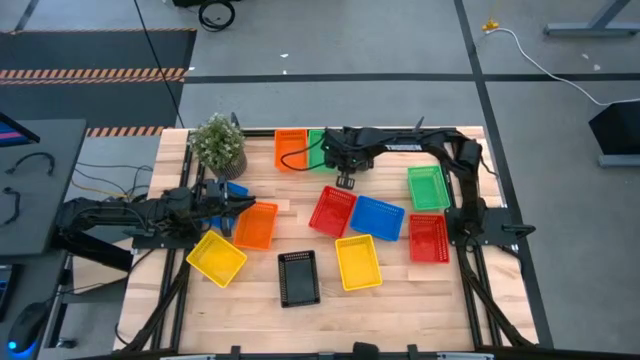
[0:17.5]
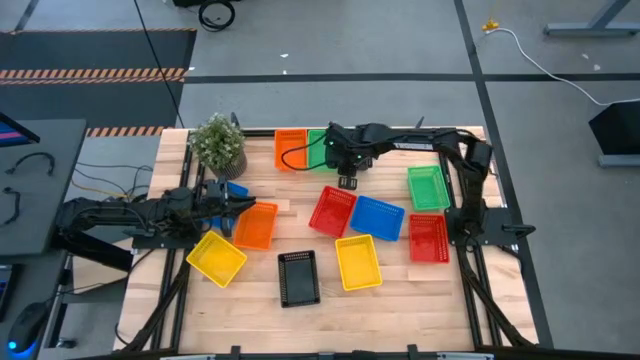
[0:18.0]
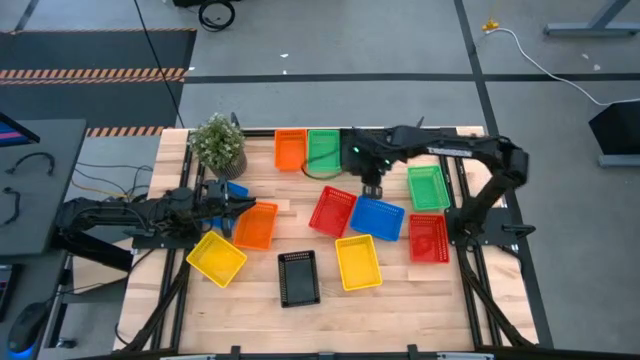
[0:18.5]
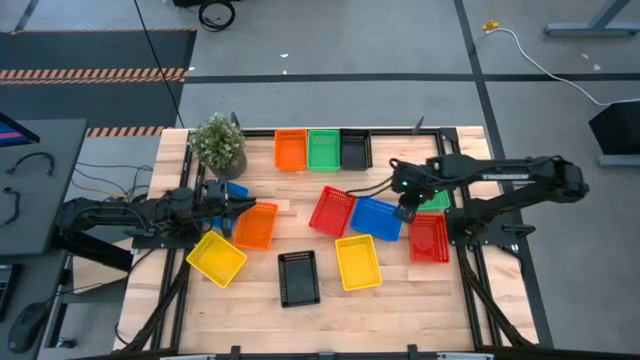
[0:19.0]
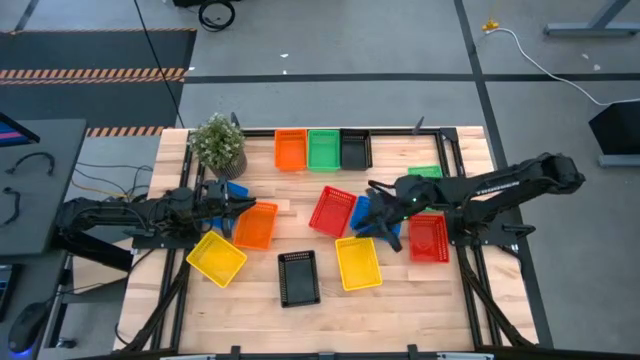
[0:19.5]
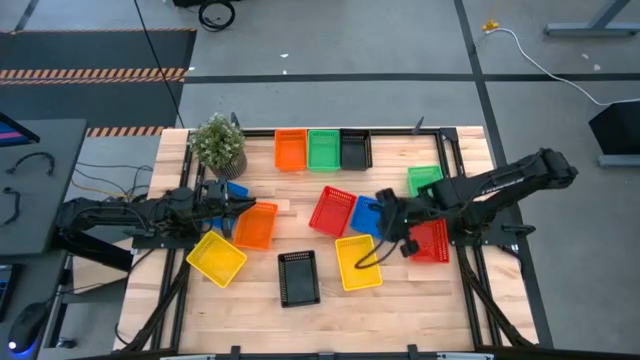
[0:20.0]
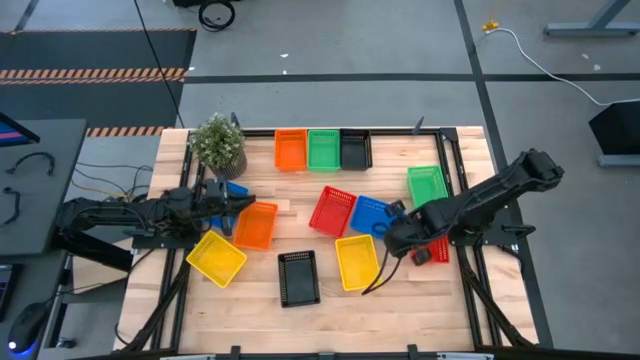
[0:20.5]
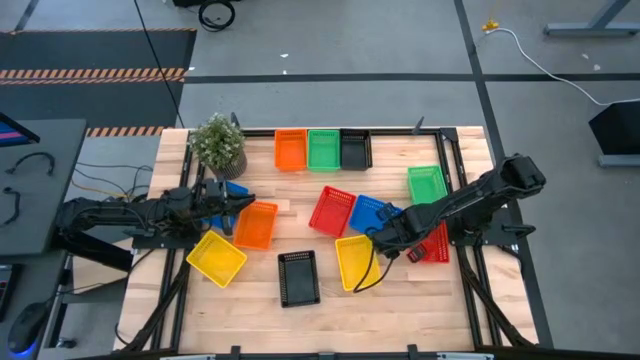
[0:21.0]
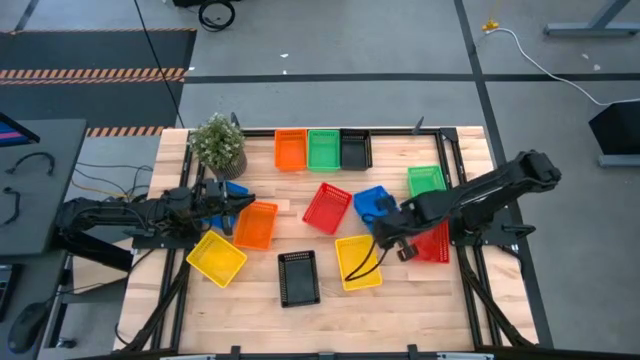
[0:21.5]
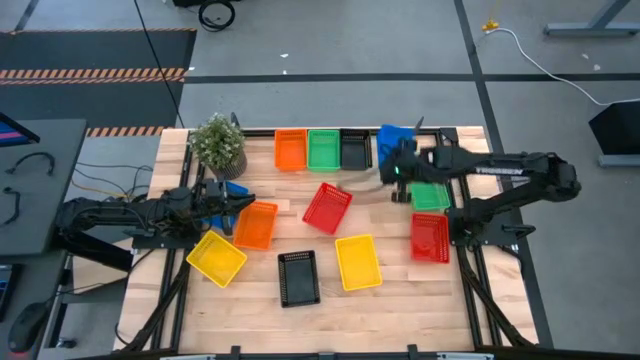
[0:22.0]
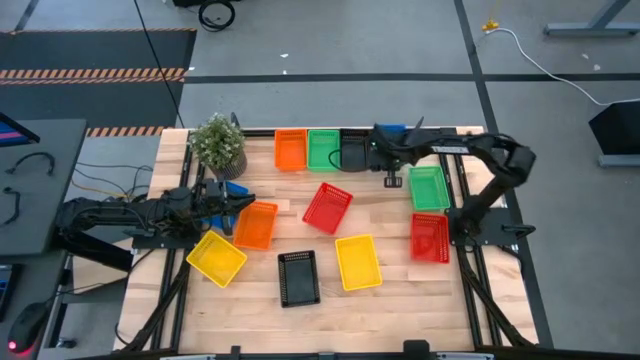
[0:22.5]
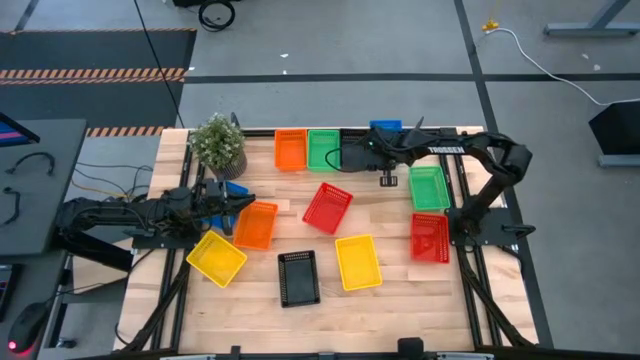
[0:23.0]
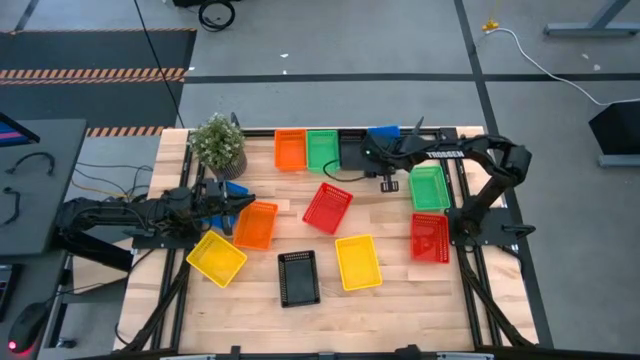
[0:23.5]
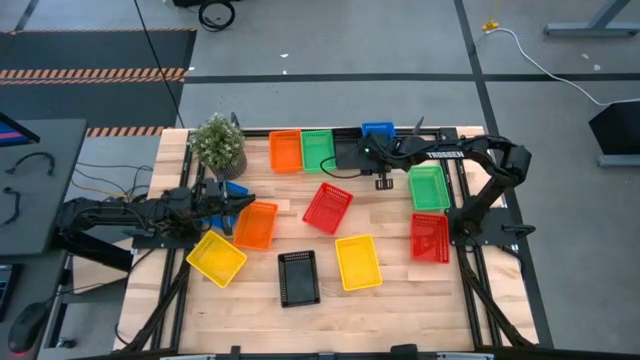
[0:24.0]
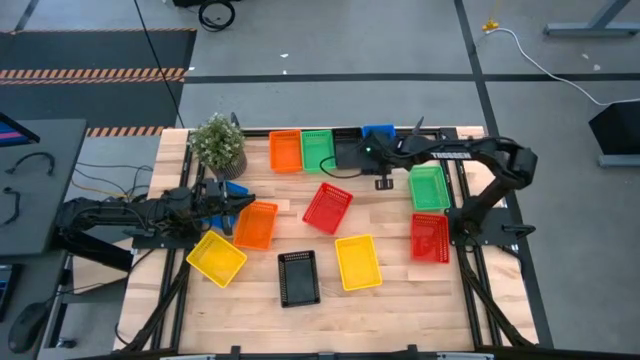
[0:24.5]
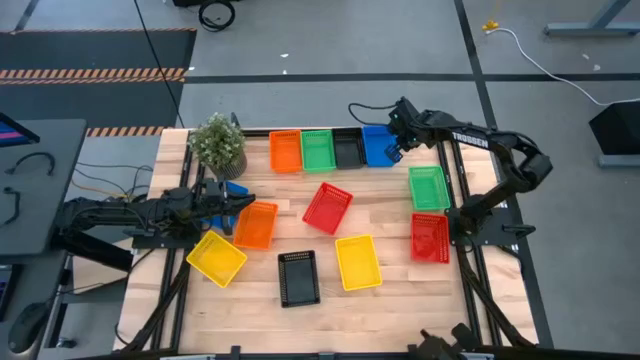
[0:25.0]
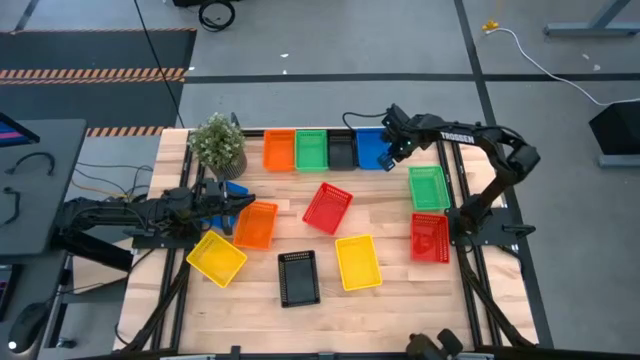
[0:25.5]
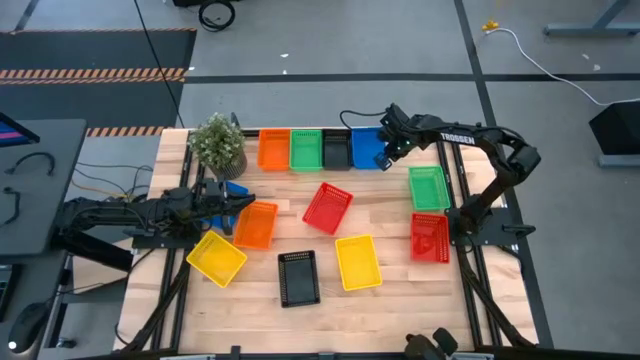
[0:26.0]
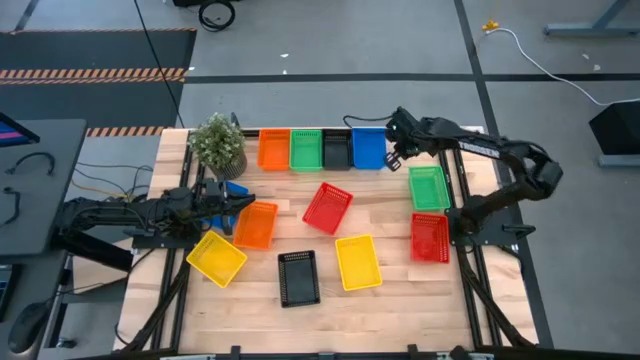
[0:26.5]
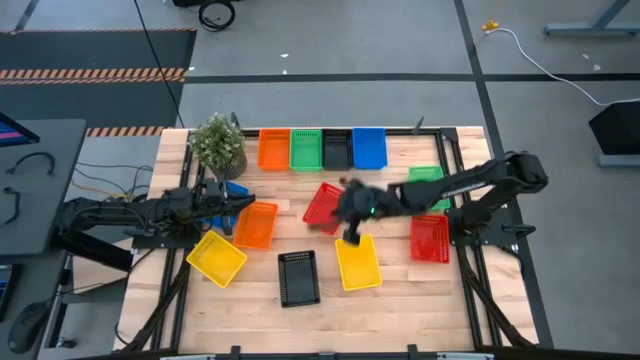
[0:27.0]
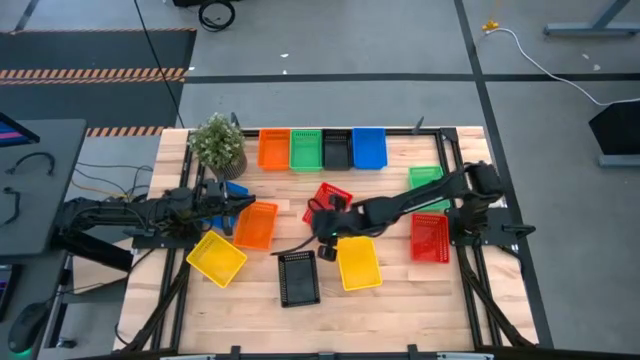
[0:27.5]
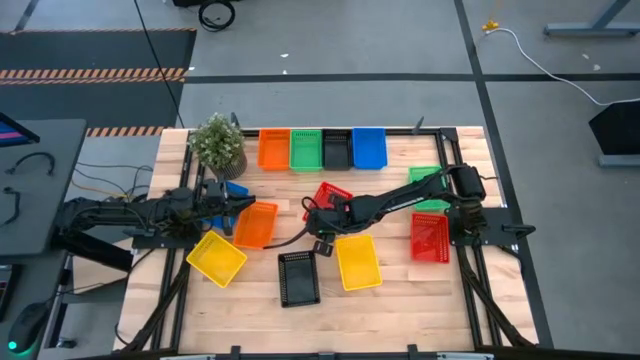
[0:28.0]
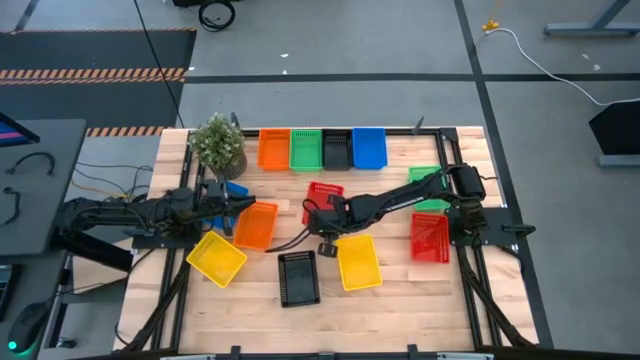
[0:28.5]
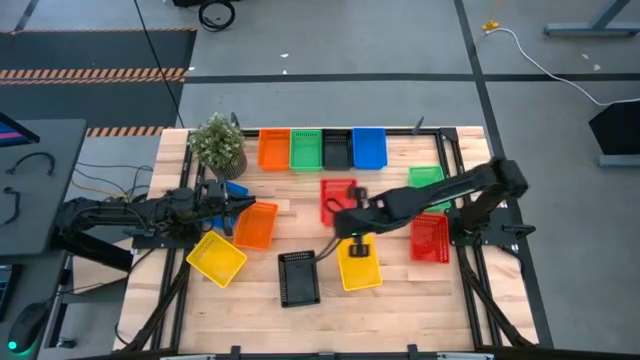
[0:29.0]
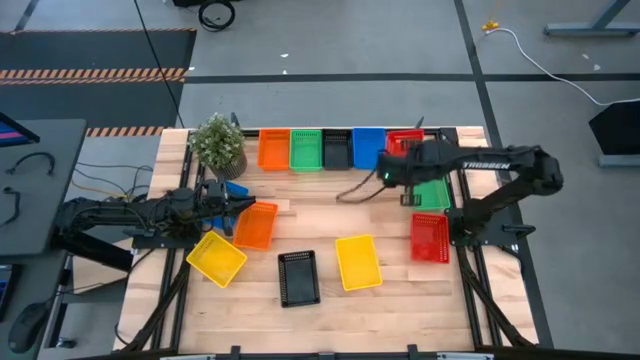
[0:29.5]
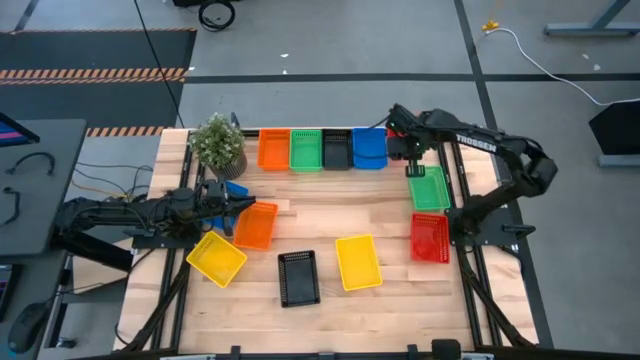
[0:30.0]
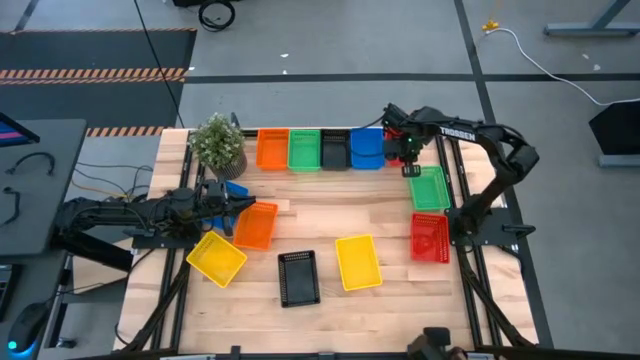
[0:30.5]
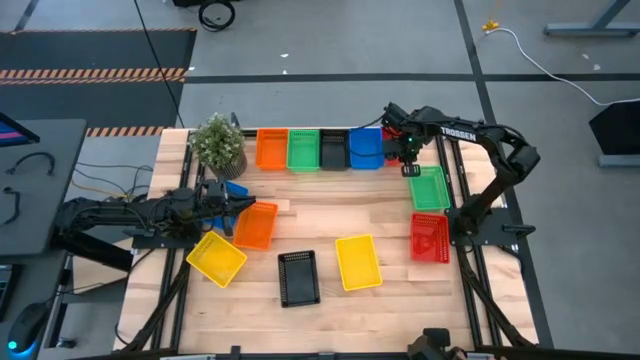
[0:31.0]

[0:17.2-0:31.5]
Prepare the bins on the table

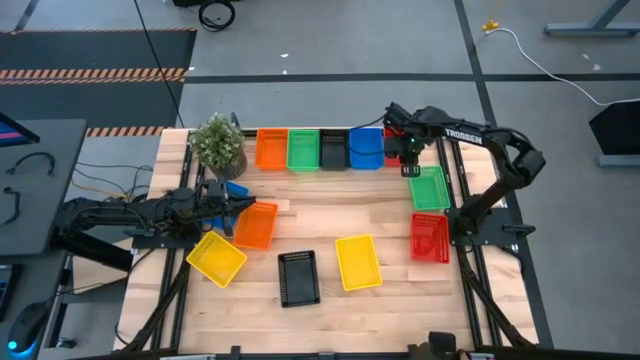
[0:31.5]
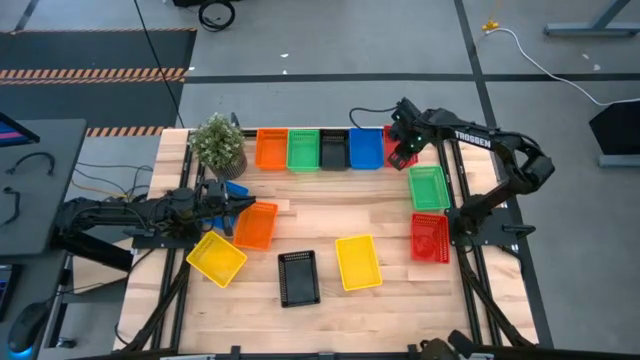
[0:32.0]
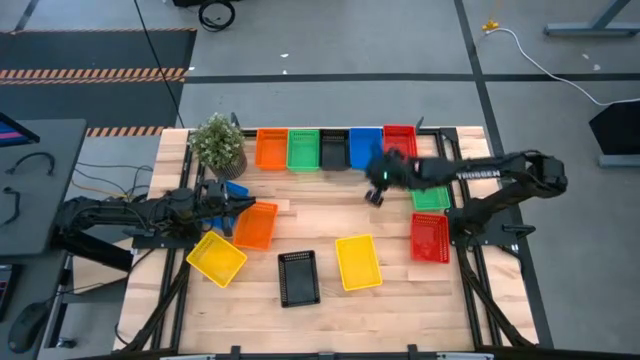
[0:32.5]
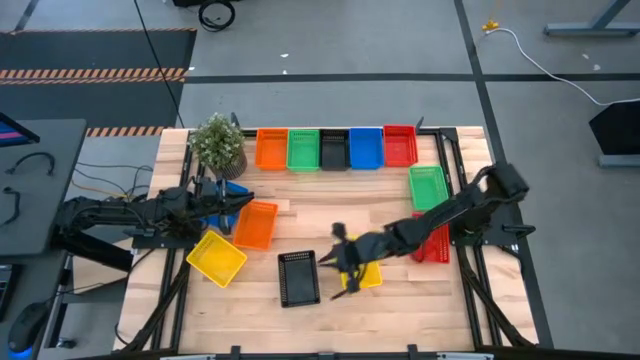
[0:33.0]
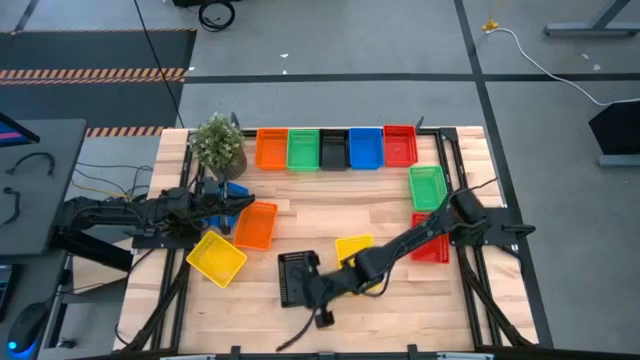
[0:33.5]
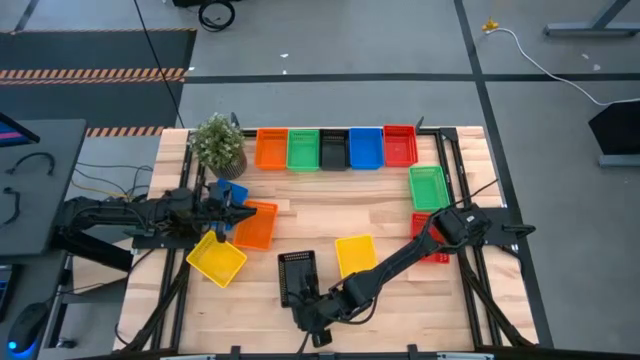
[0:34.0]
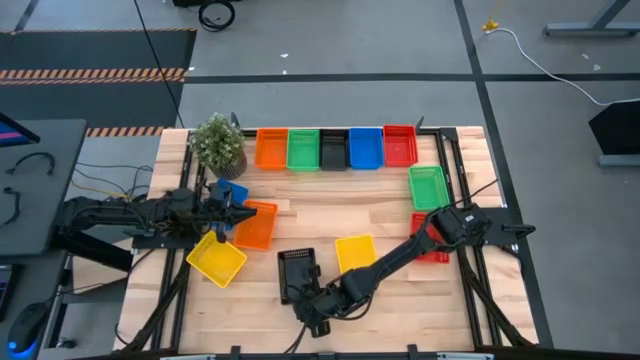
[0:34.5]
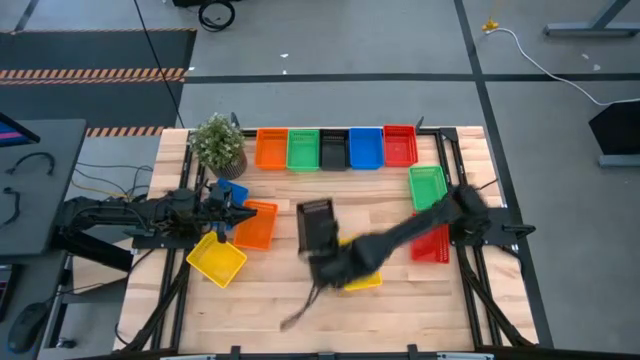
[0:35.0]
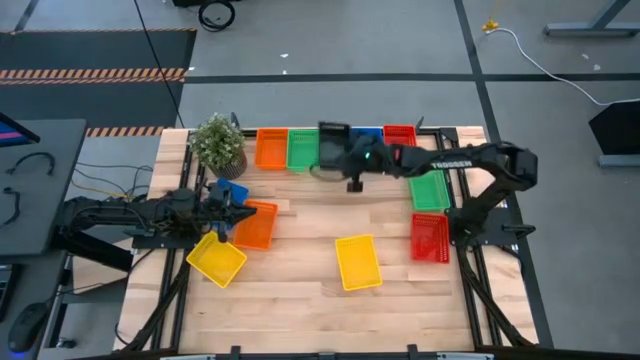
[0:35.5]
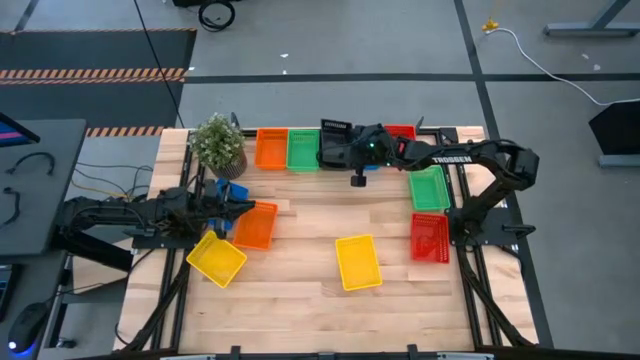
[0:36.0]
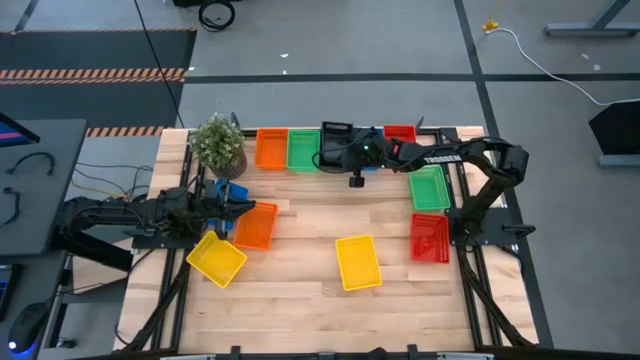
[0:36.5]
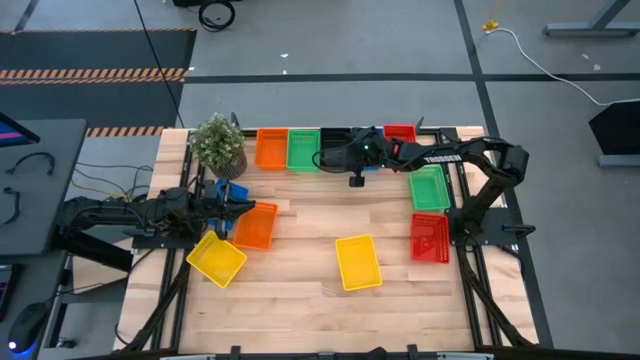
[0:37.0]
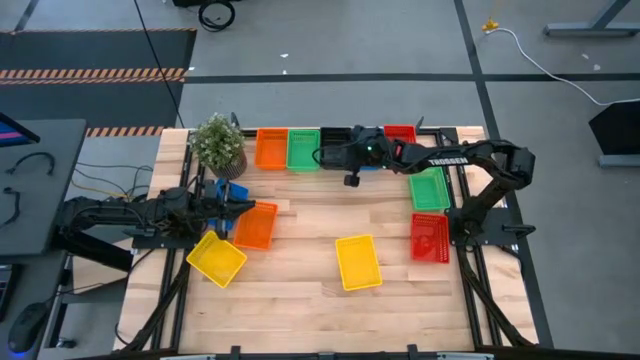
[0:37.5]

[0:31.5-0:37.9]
Stack the bottom black bin on top of the top black bin
